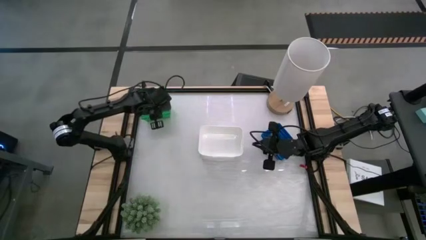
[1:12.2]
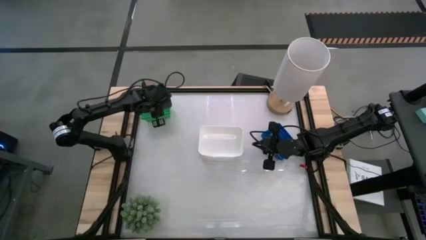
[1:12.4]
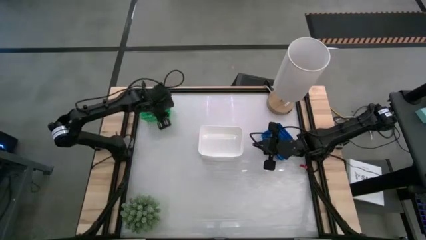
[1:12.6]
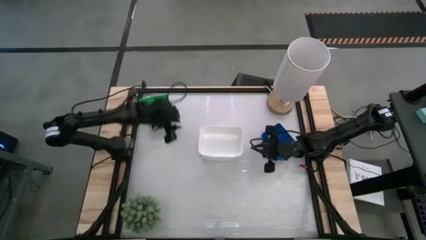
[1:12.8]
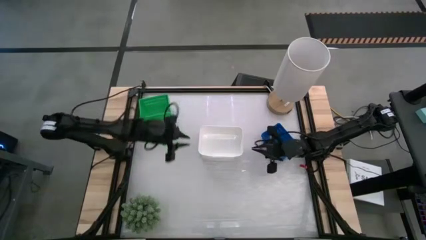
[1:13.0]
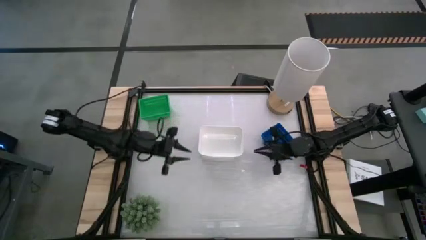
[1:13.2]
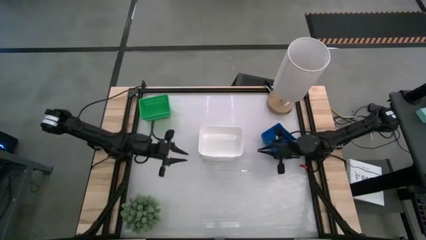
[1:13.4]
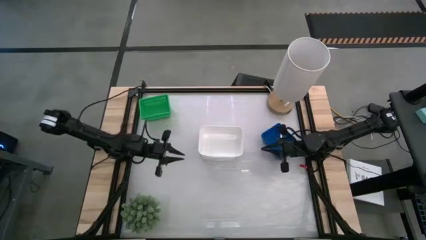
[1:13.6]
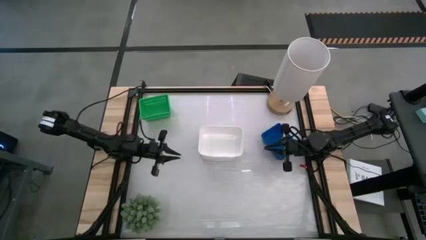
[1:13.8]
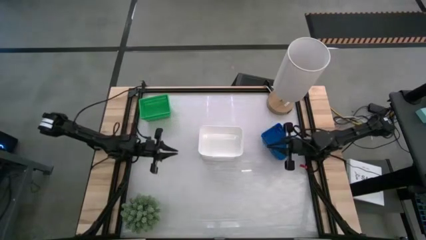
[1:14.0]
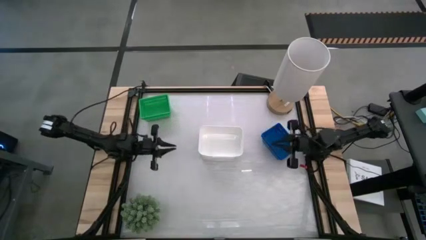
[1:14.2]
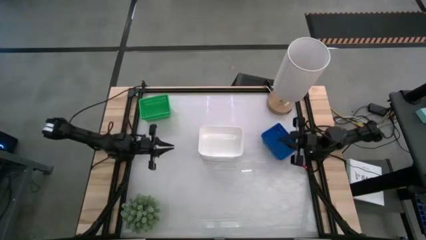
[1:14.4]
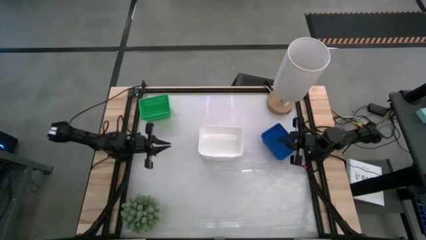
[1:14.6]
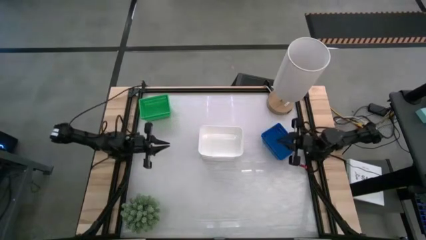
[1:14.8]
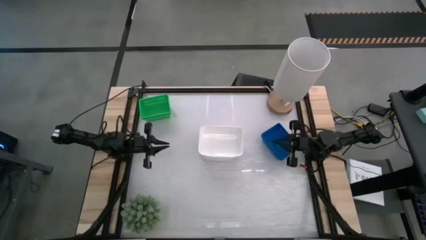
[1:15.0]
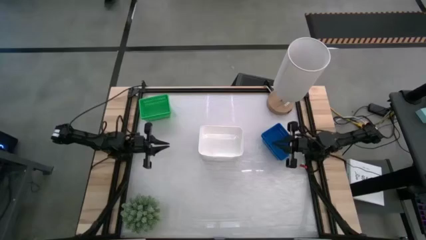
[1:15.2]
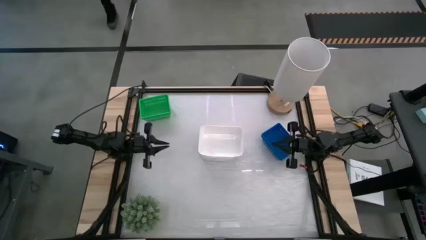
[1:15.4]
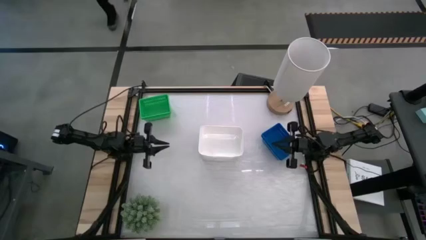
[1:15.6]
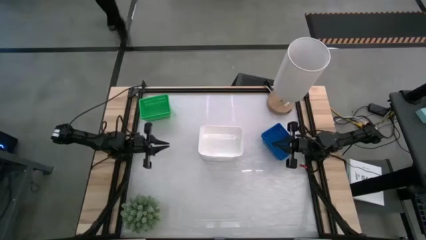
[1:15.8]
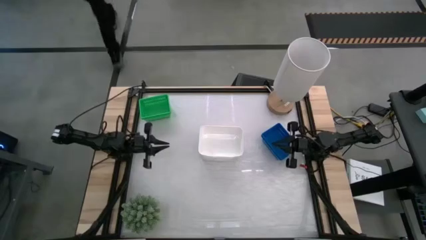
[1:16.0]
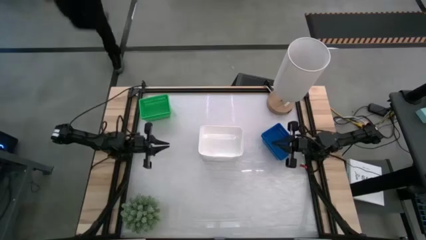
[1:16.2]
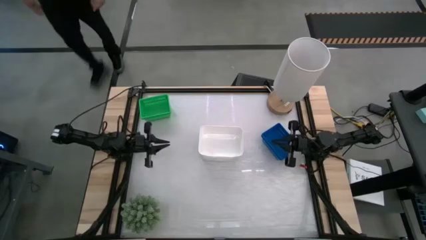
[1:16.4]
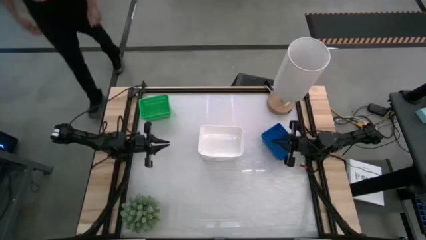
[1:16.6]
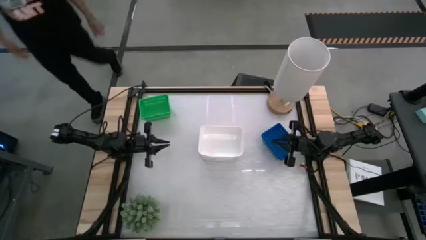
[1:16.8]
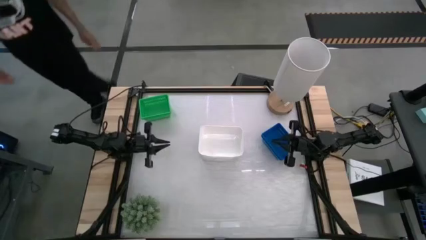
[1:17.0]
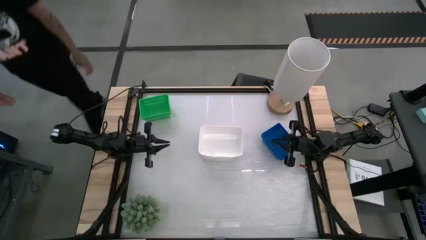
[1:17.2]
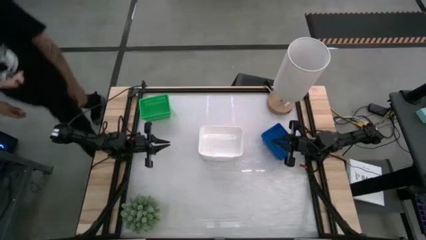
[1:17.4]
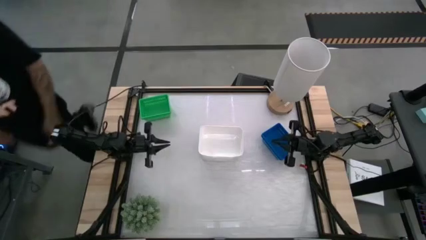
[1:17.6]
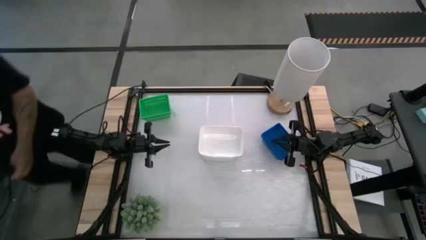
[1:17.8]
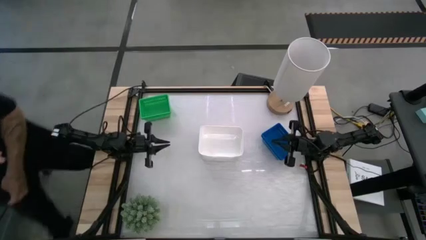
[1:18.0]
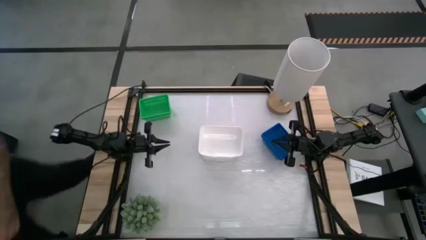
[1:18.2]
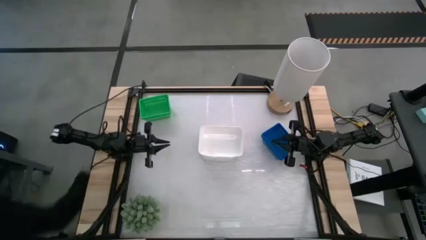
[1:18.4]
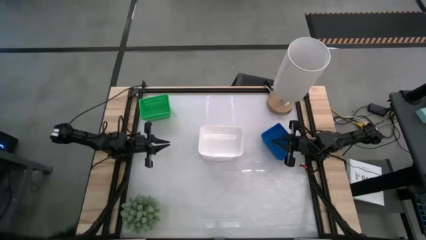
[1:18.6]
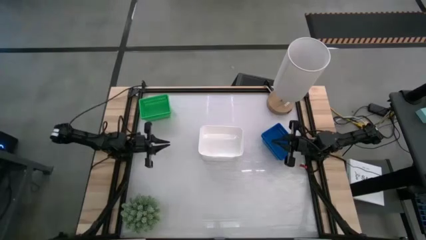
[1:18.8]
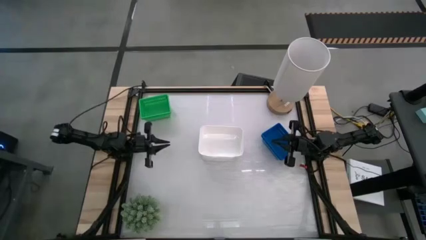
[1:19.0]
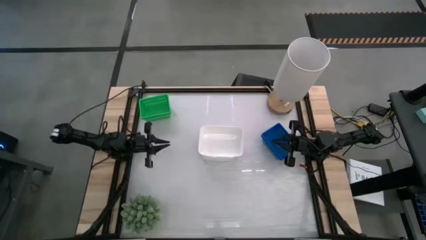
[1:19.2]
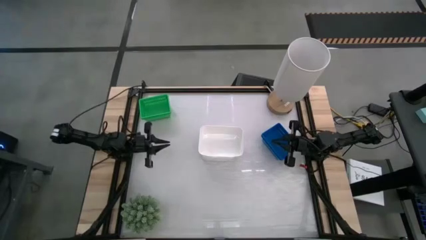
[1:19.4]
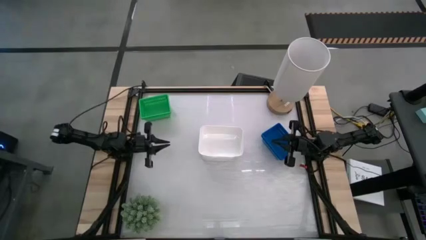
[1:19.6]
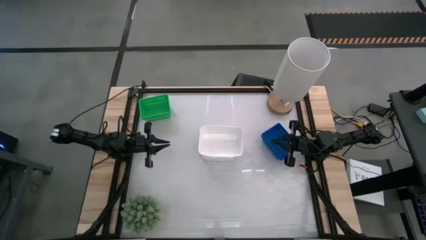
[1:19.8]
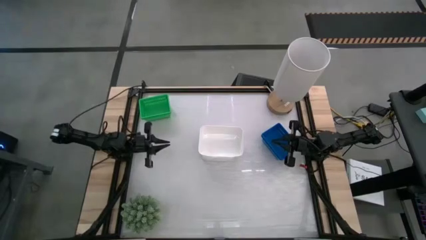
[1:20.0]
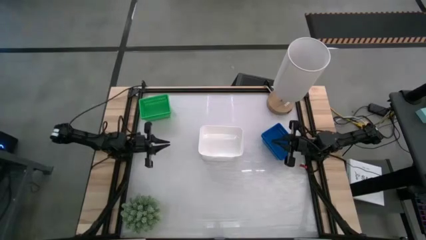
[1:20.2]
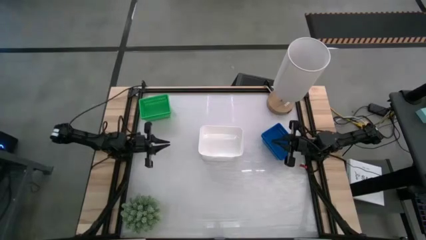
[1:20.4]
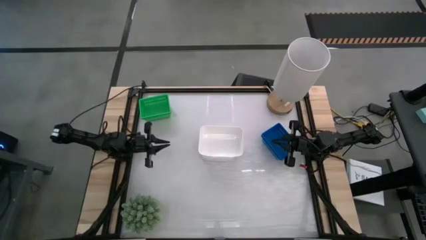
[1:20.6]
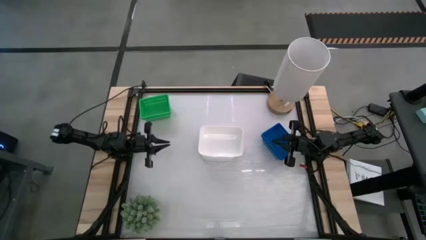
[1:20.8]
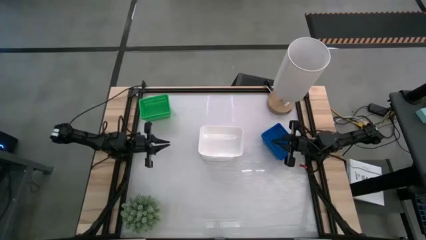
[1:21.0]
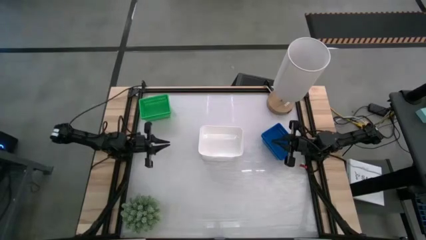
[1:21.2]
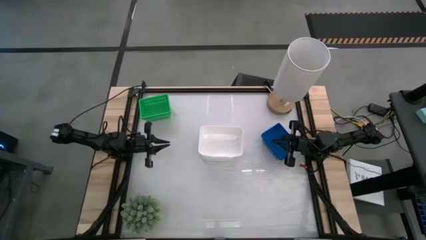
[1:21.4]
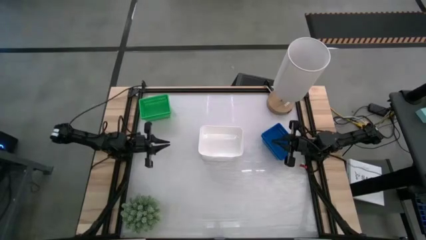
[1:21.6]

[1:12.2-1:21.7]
Return to Home Position
